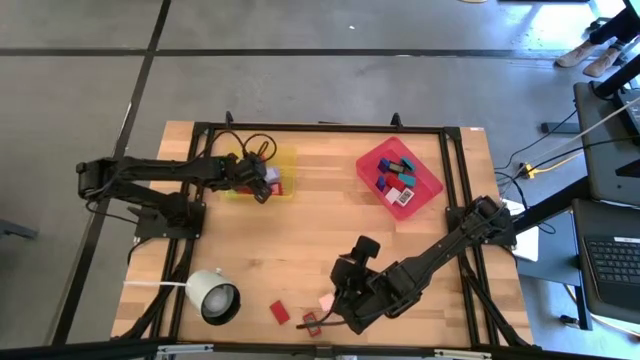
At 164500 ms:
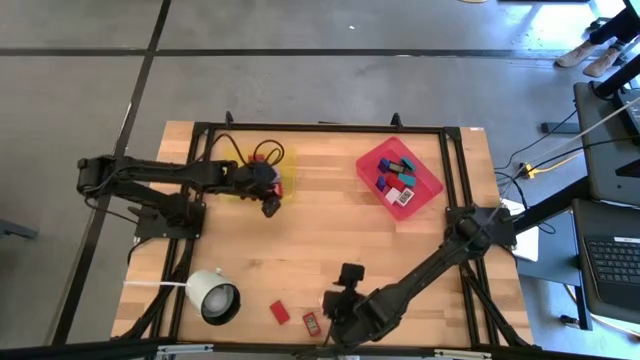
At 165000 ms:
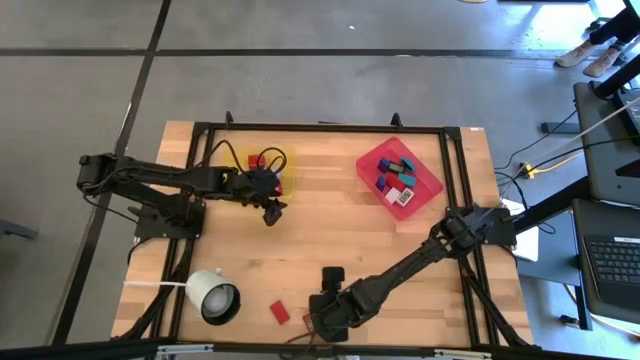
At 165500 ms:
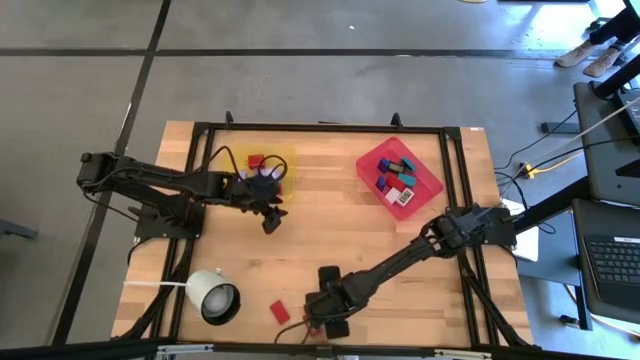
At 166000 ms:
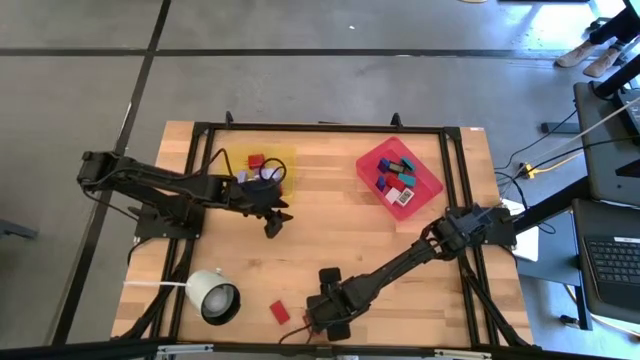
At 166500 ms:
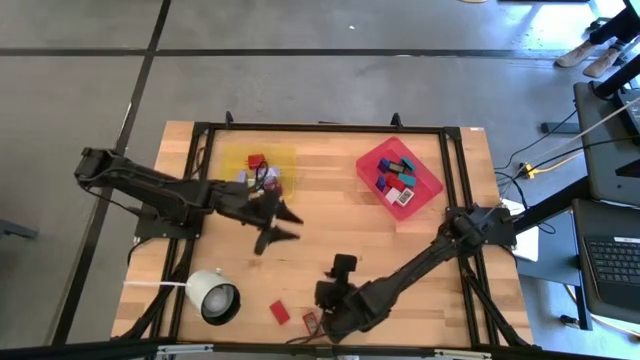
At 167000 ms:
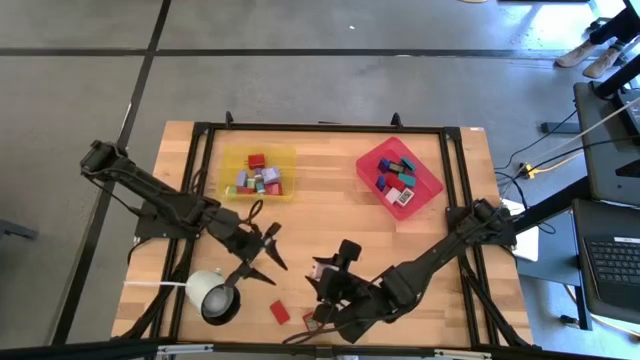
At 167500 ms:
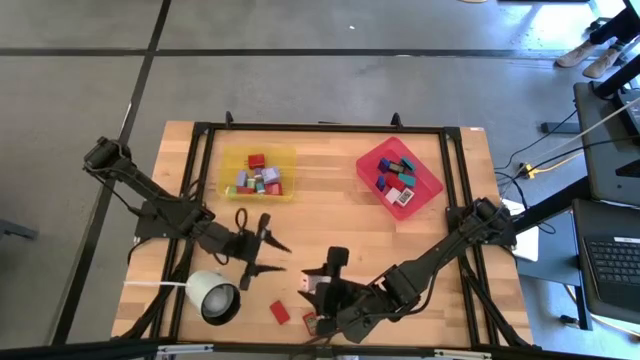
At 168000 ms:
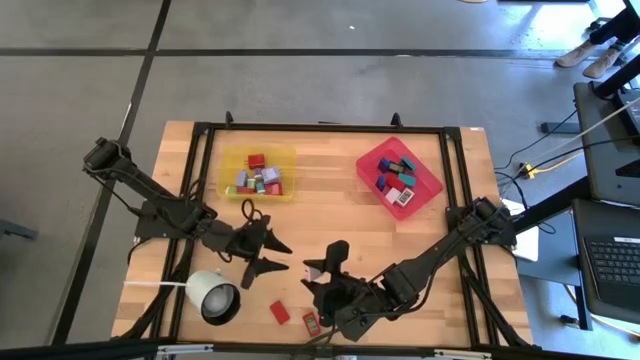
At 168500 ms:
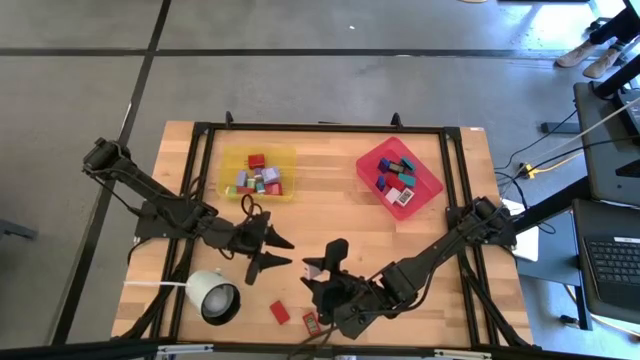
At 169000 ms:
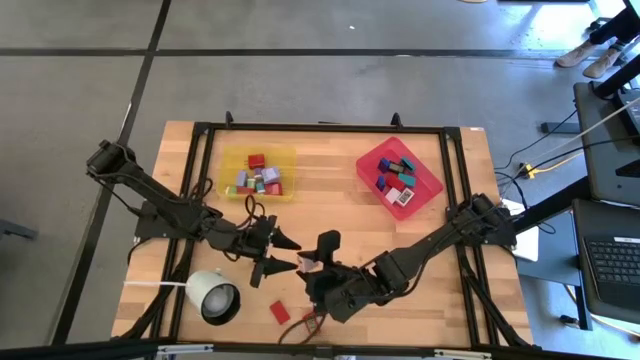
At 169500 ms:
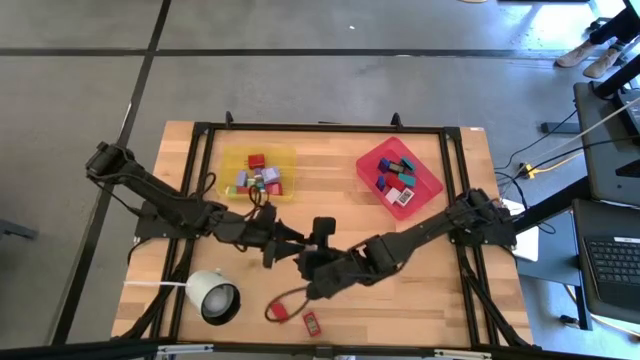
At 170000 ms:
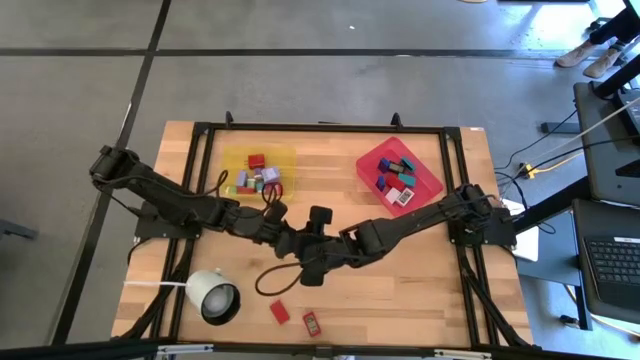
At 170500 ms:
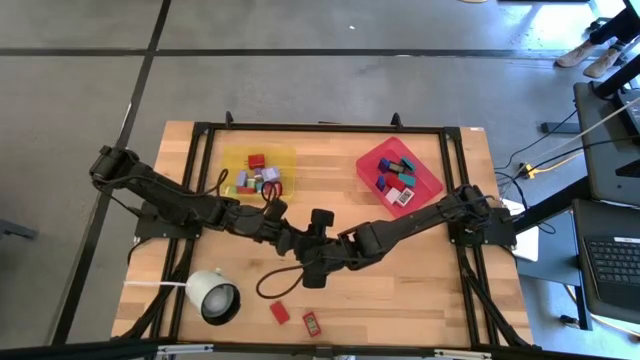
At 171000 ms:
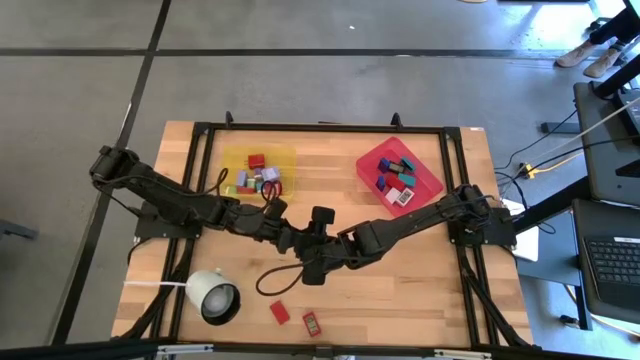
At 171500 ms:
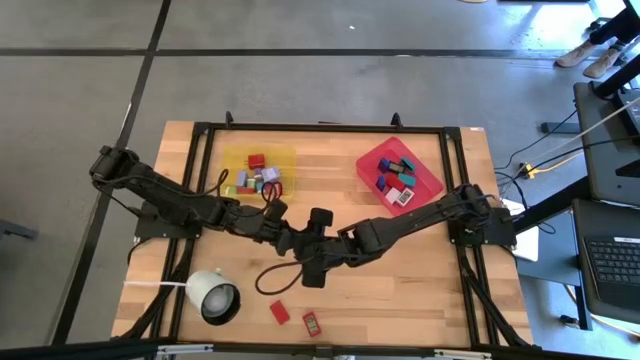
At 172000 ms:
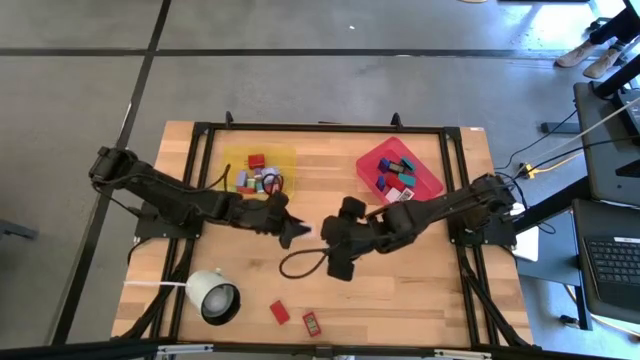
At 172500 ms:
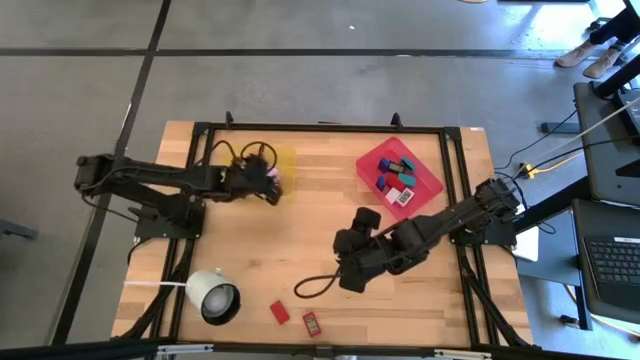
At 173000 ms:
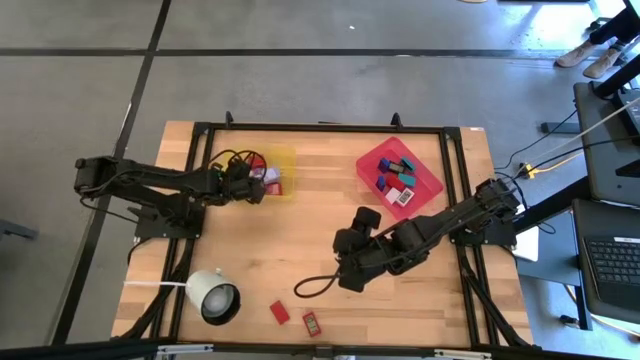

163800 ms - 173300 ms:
Task: Pick & Place Office items
Put the pink charger adapter into the yellow bin

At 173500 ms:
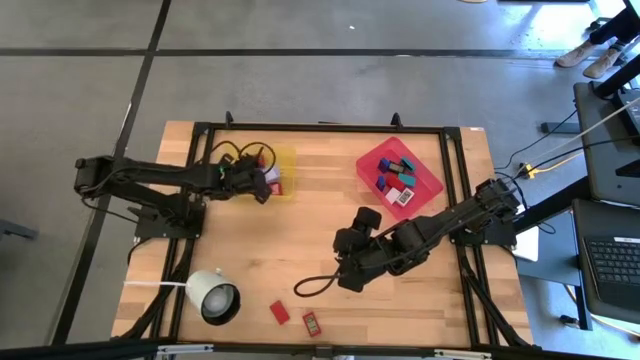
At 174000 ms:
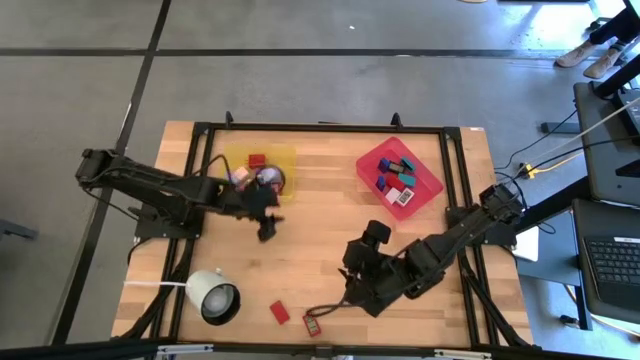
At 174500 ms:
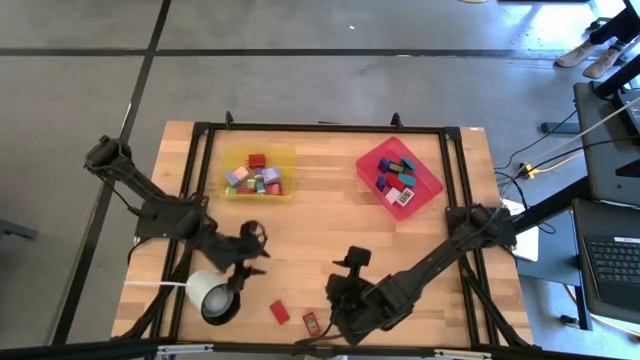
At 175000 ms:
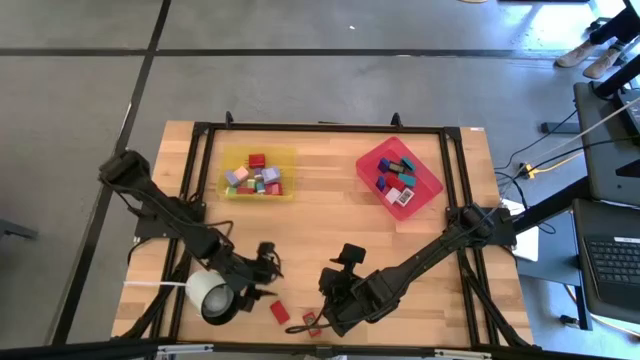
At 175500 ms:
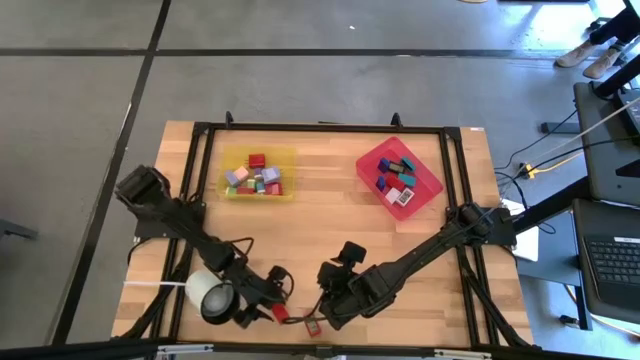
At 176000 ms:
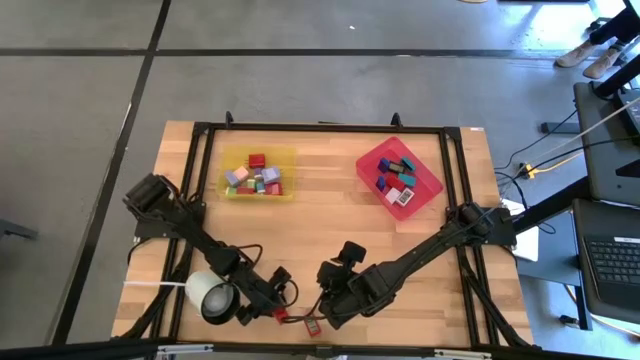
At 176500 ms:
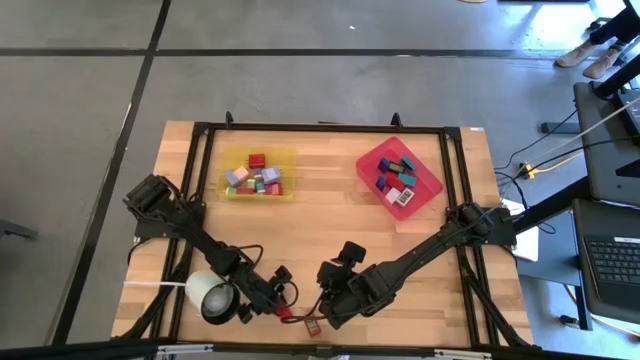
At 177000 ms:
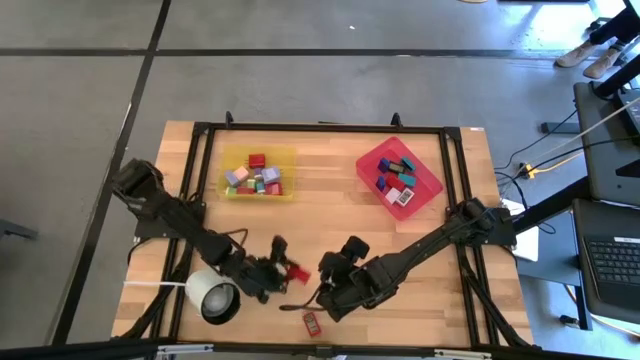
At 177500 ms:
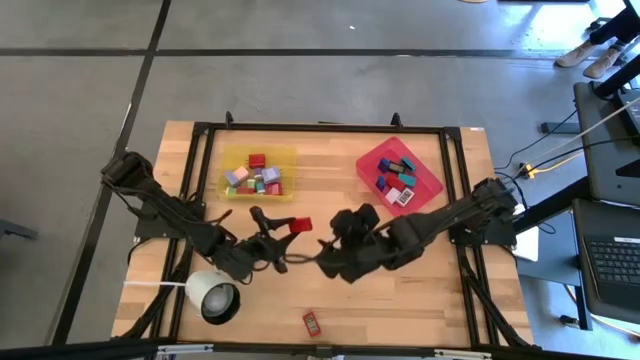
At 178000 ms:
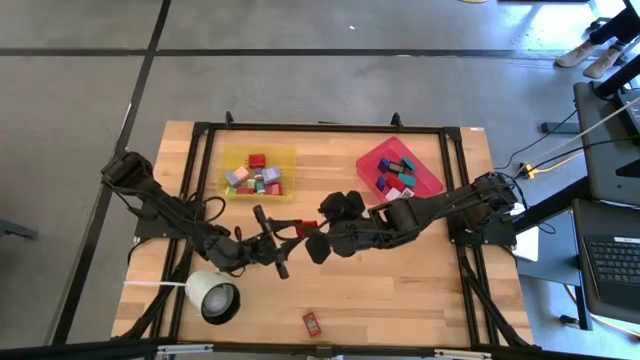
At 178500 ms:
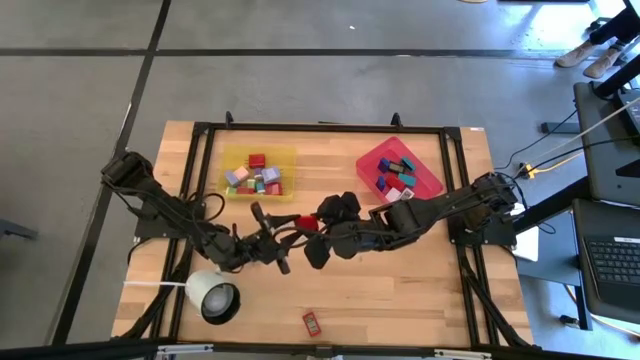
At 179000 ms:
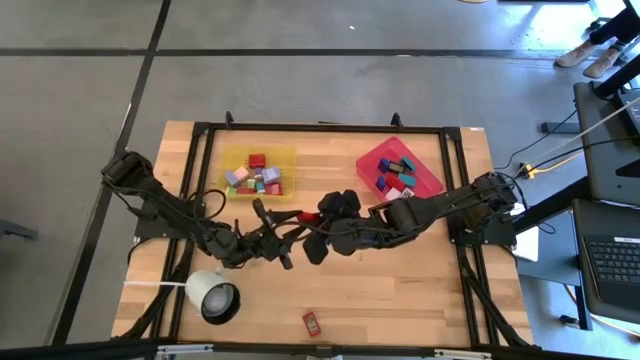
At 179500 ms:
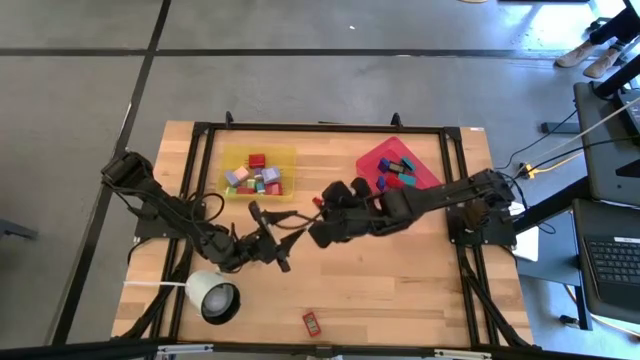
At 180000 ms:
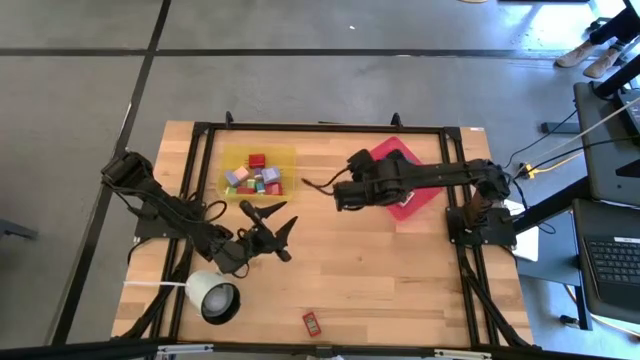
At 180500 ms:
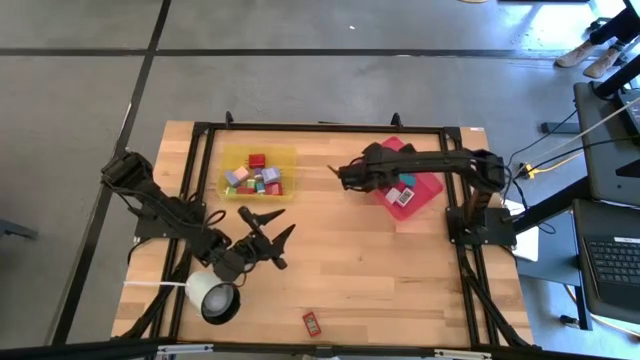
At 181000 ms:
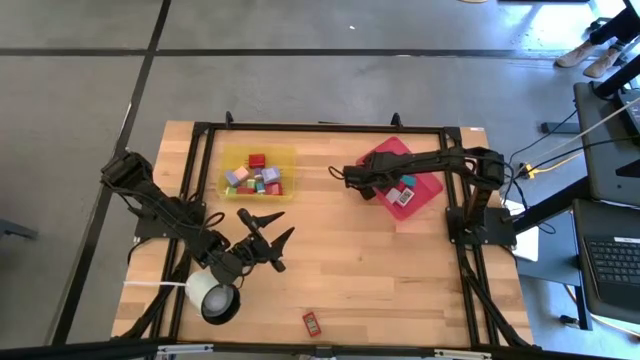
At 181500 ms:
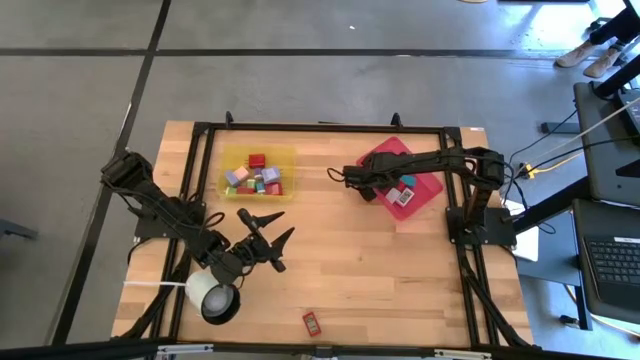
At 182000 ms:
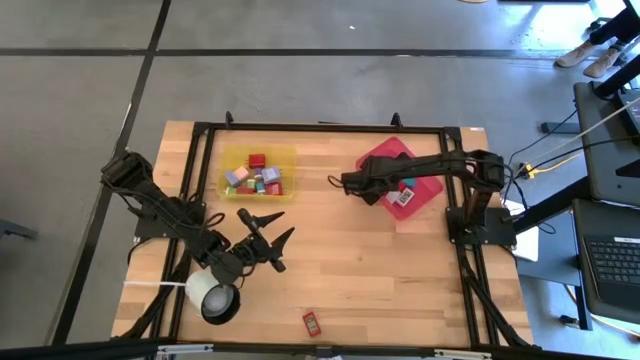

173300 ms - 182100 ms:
Put the left red digital clock into the pink bin

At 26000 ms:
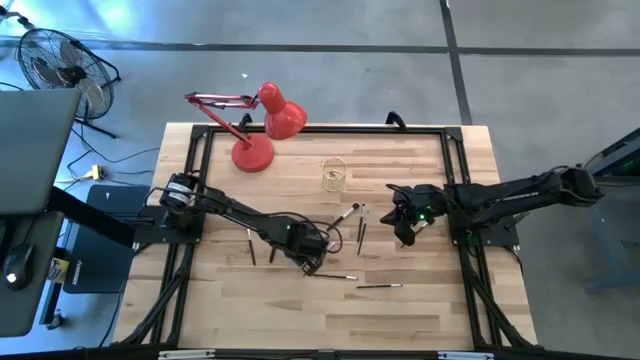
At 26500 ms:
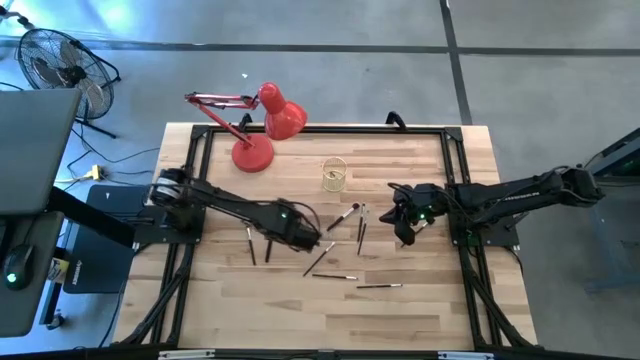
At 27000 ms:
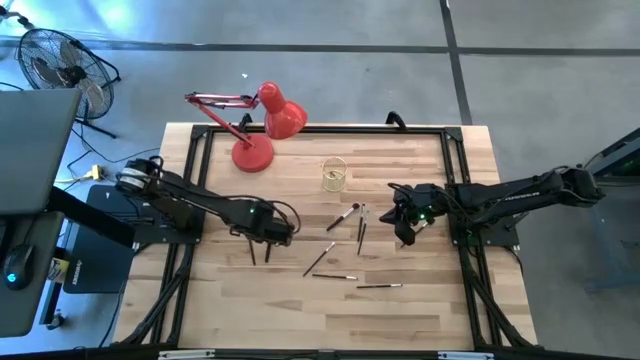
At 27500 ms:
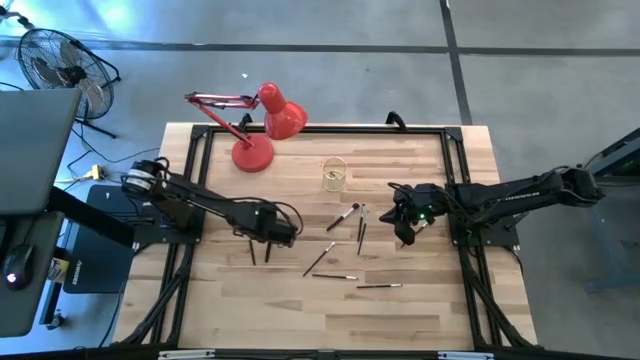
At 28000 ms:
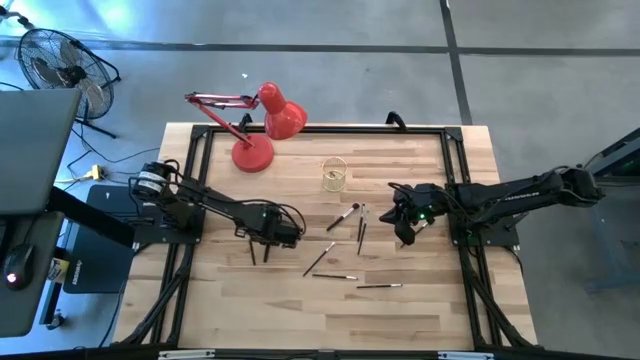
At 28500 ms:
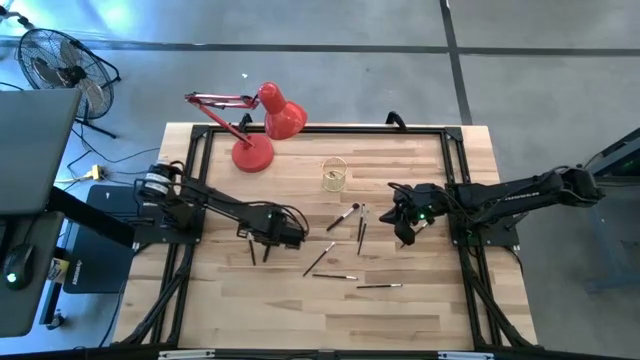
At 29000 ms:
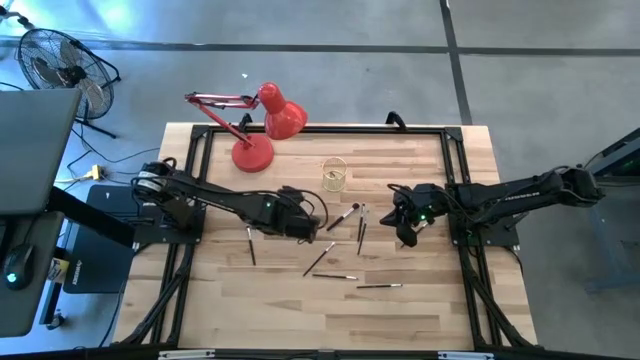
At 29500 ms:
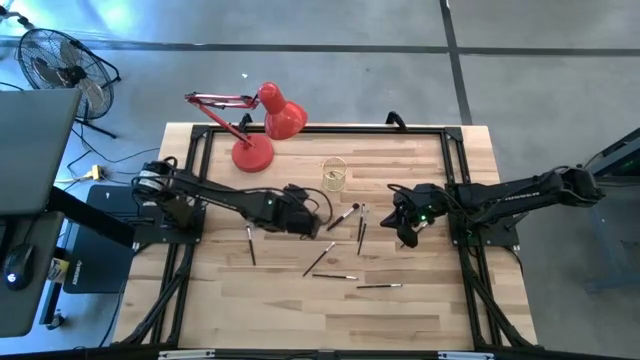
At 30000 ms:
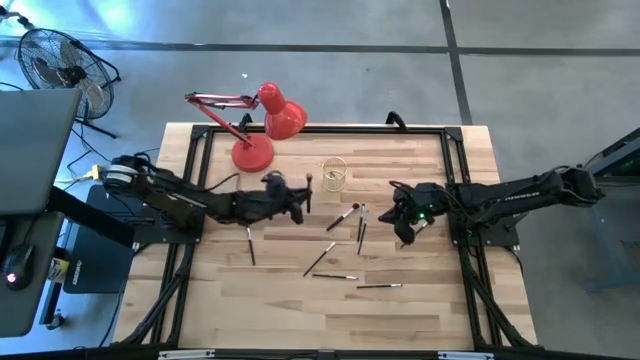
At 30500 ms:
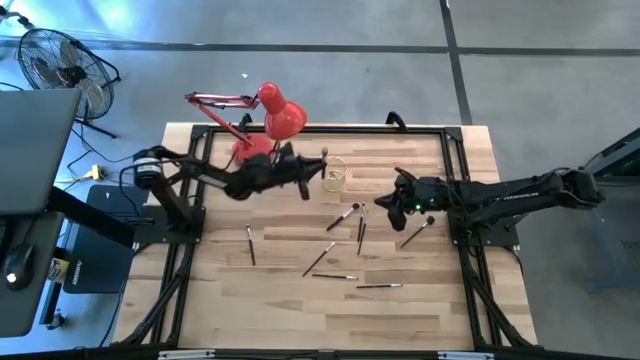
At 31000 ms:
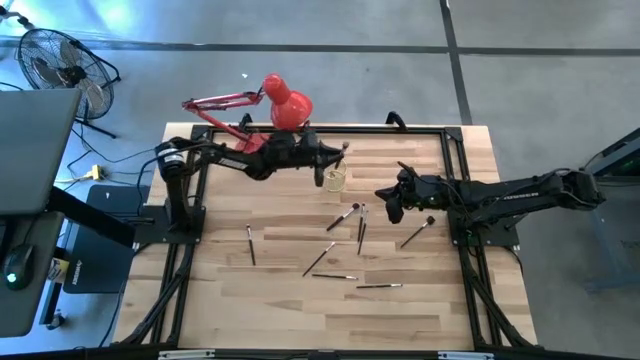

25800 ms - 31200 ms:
Task: Put items in baskets/containers
Put the makeup brush into the wire bin
